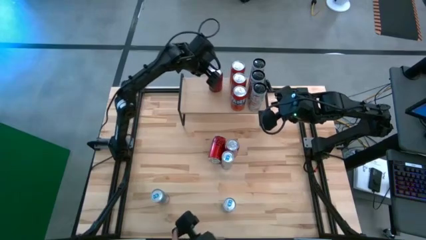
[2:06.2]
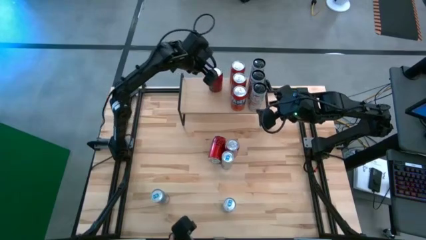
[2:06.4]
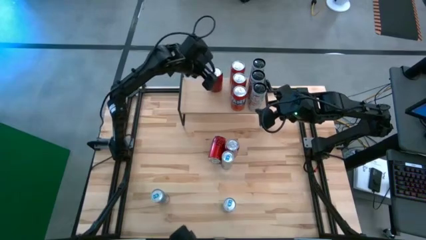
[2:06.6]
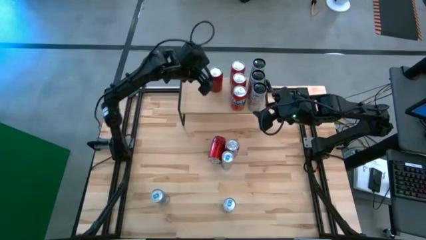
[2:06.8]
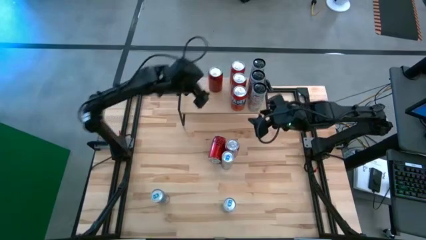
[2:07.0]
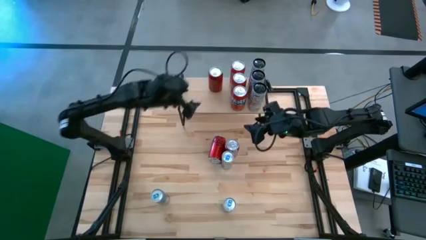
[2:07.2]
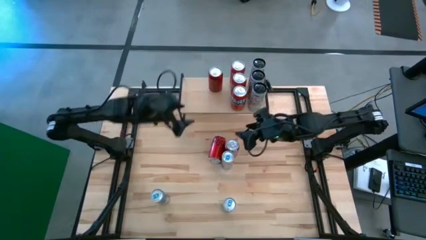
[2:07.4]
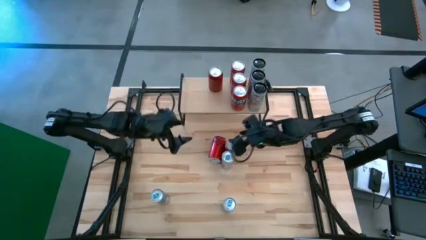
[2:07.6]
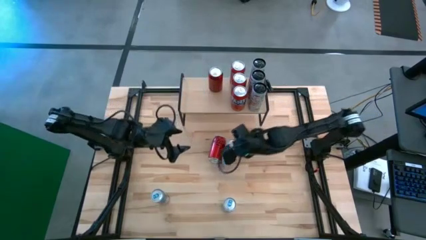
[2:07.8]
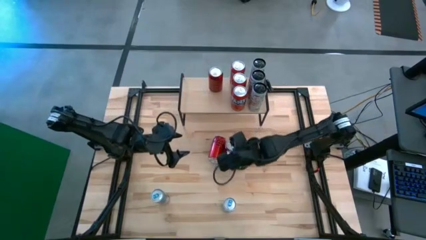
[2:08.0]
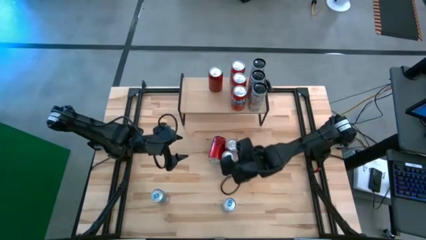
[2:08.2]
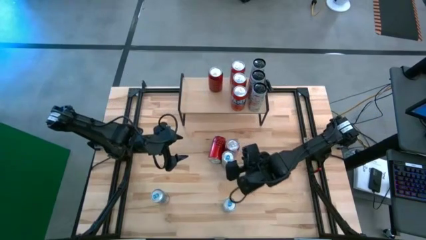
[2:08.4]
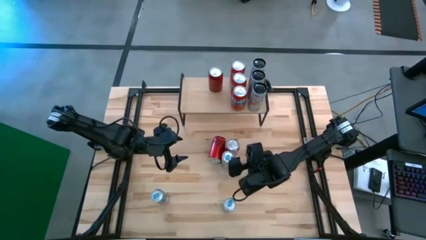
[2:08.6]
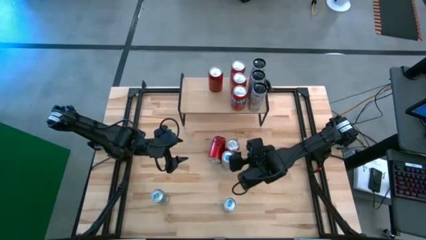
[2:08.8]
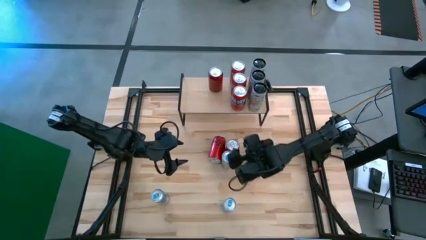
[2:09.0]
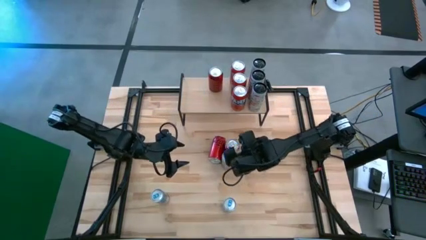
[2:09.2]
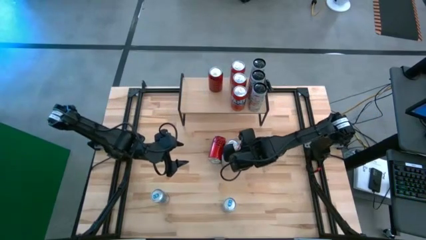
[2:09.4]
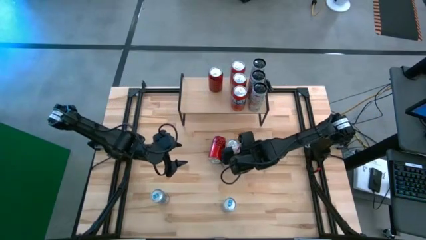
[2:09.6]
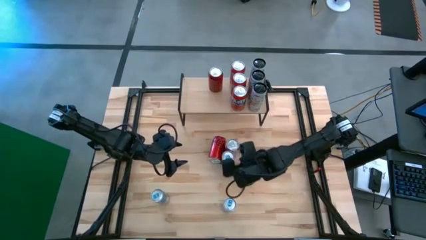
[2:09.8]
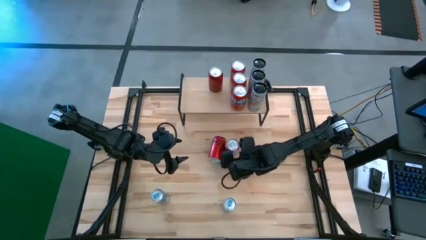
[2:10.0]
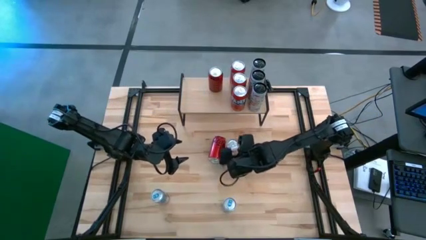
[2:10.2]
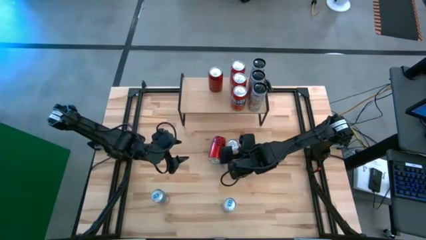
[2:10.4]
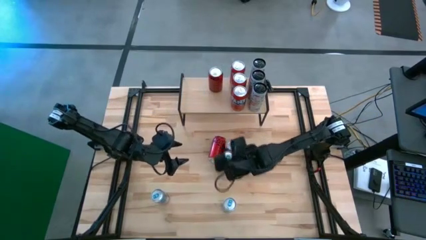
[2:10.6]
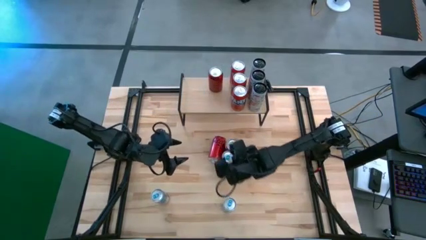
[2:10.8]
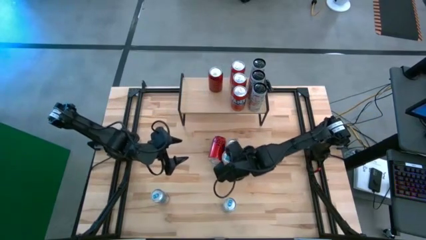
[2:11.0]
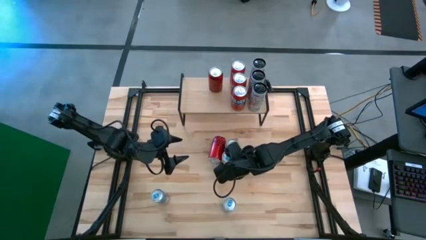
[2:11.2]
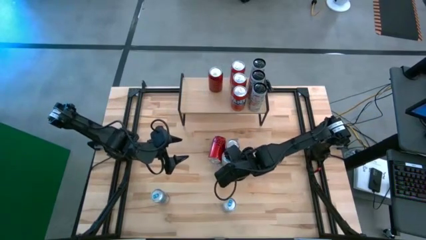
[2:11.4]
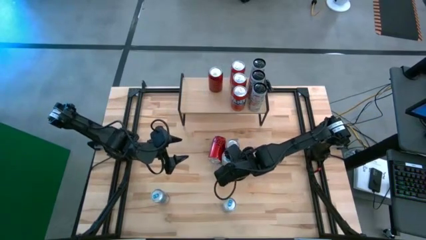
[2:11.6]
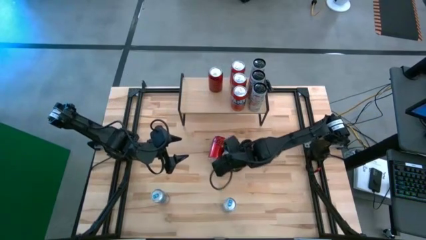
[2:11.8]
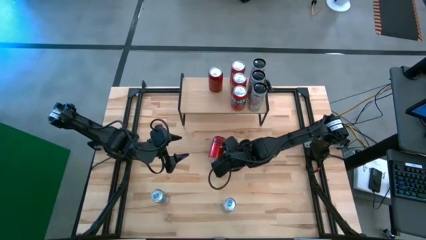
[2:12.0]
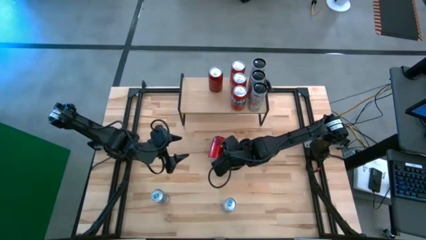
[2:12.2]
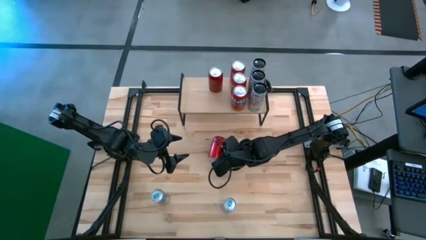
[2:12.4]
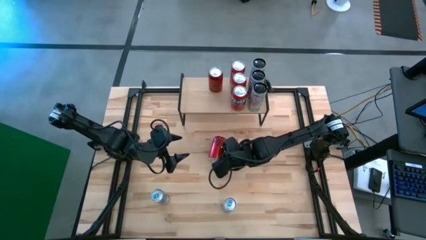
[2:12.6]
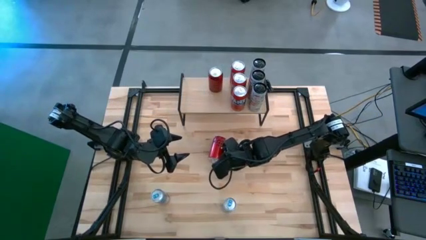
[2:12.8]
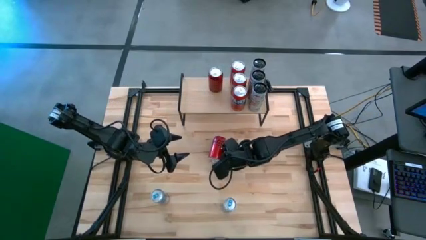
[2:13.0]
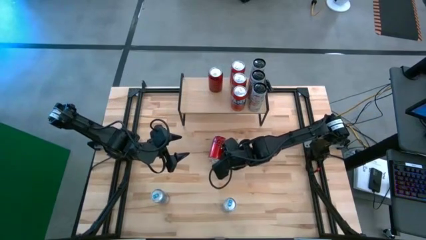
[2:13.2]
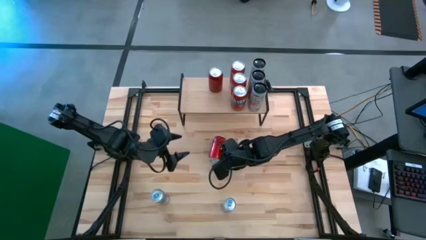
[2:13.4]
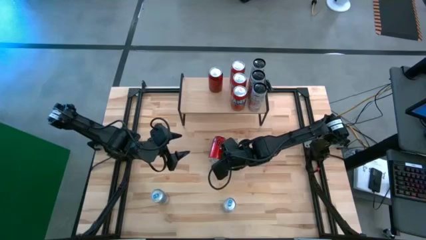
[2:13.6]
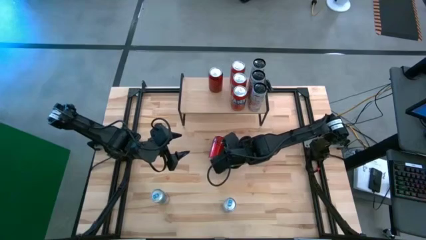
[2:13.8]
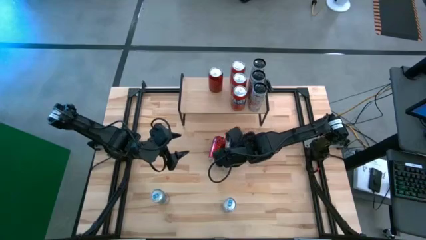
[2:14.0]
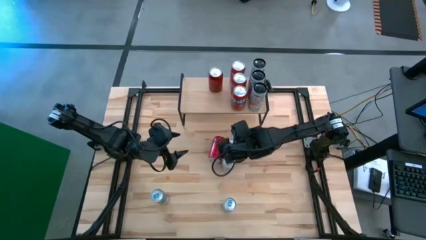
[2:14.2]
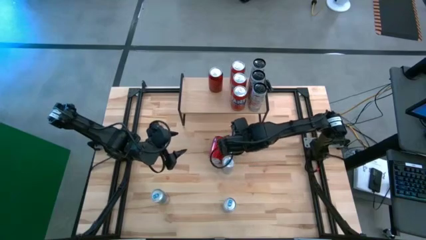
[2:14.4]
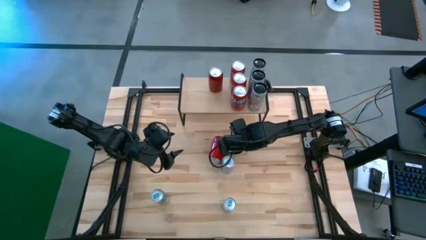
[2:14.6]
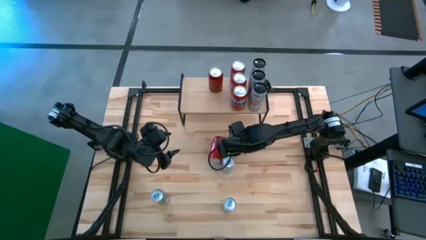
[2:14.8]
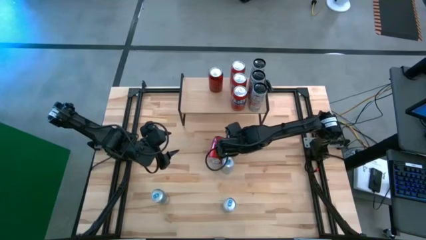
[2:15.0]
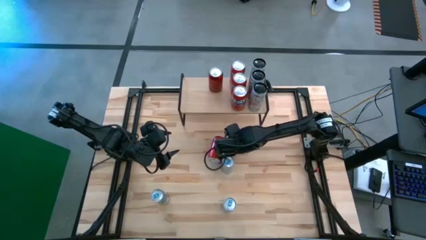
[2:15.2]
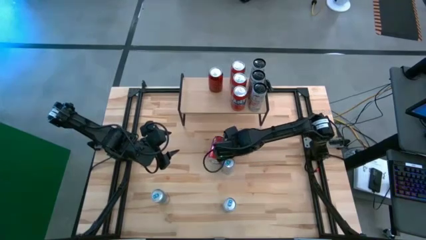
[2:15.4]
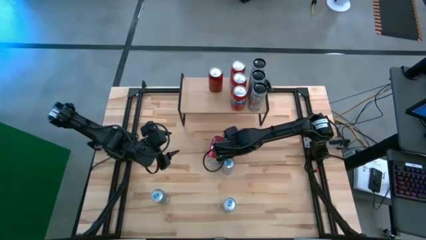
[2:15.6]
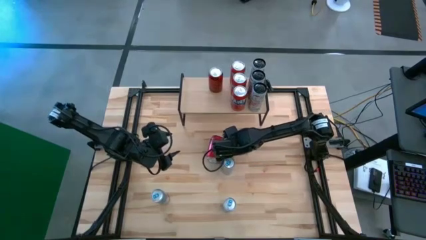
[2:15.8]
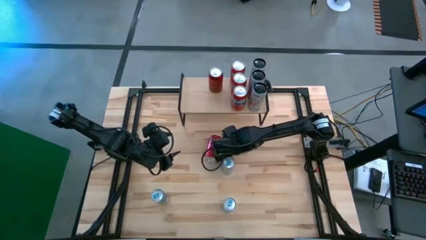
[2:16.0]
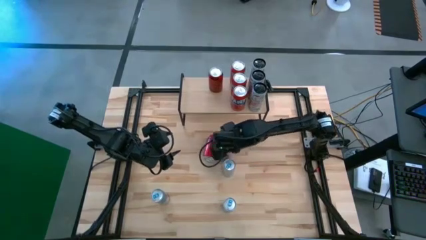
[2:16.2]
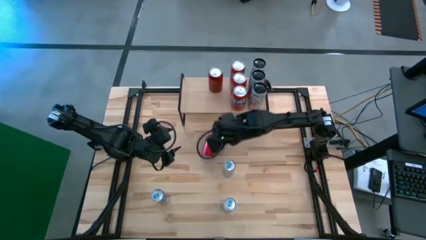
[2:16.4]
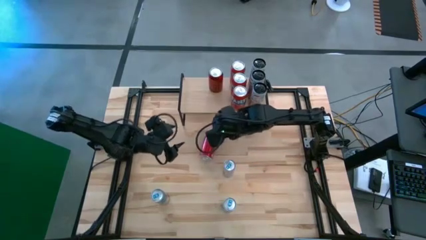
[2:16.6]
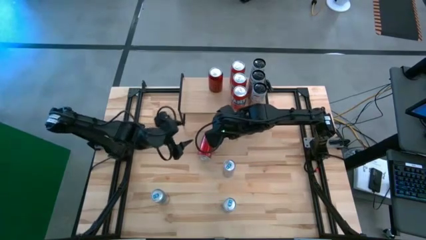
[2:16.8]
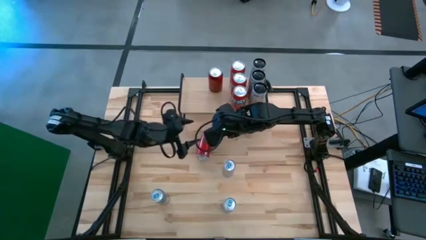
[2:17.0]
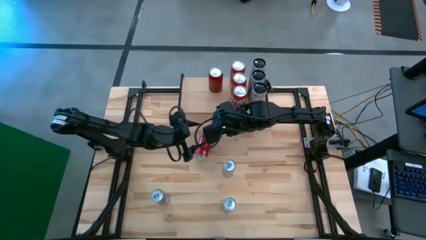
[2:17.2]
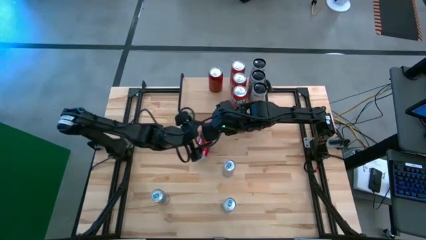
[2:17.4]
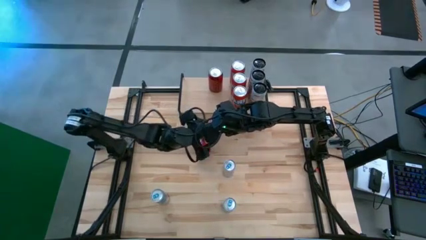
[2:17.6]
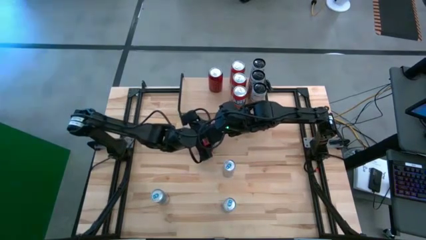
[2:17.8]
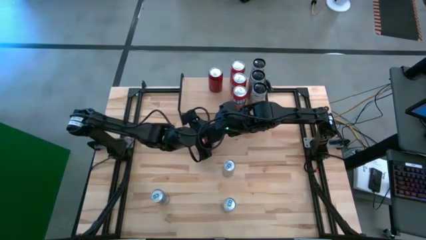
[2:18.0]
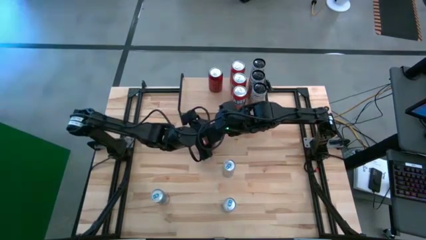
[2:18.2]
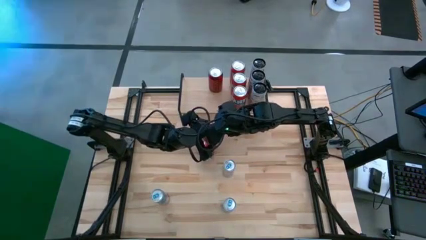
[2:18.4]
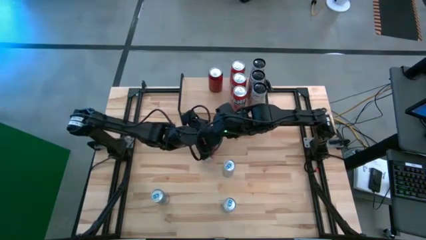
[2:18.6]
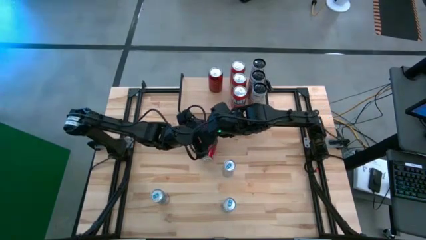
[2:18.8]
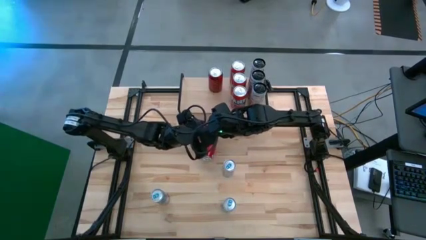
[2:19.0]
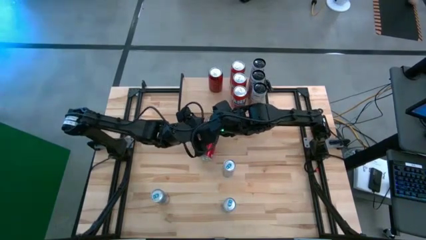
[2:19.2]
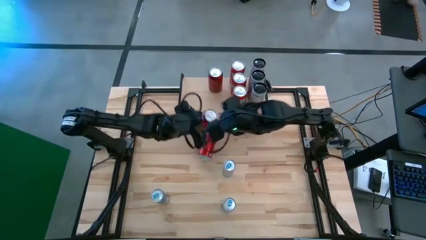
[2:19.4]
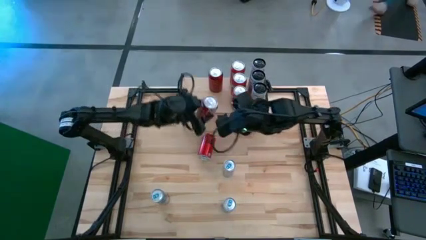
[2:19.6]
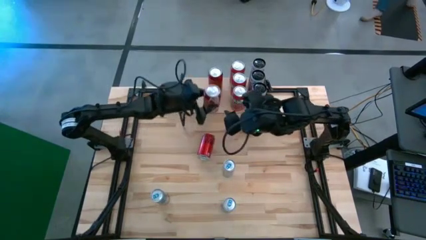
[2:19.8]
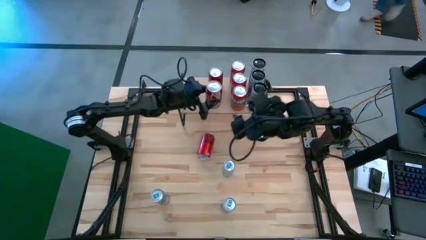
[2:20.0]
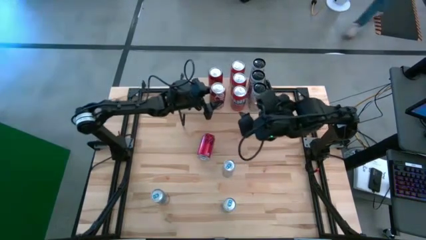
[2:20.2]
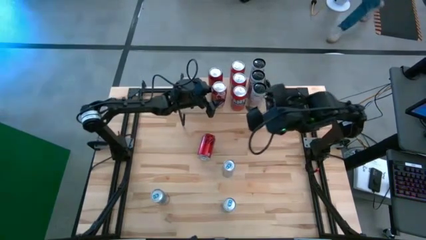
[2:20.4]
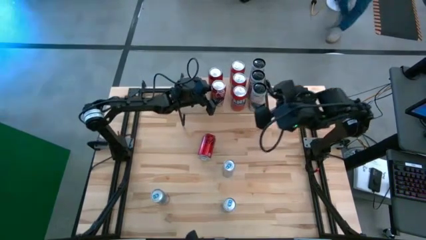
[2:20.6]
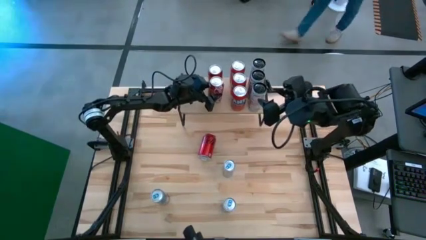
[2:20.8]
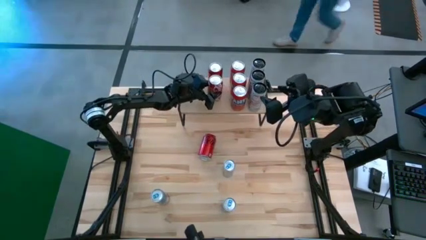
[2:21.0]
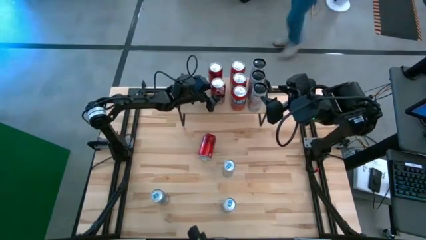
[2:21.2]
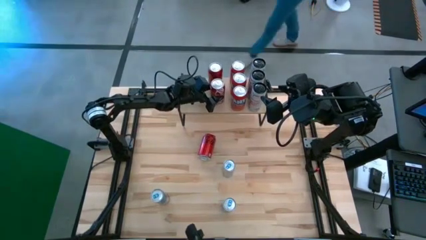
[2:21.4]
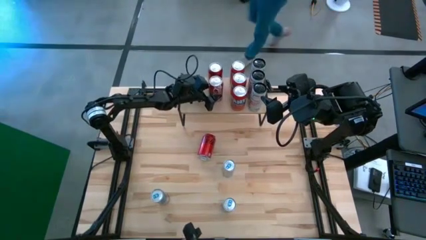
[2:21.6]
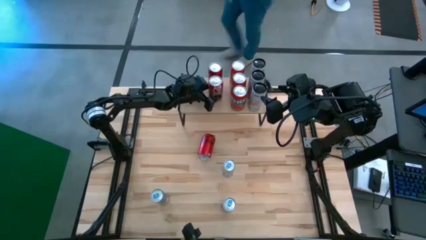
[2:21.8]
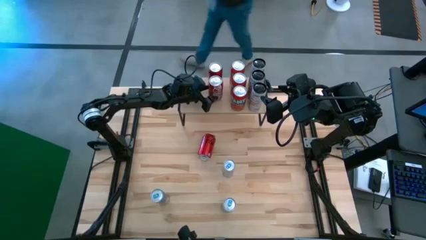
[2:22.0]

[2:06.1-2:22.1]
Task: Place canned beverage on shelf
Put the red white soda can aligned with the other red black soda can on the shelf
